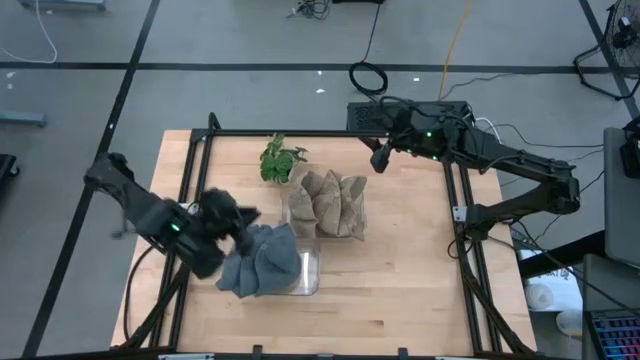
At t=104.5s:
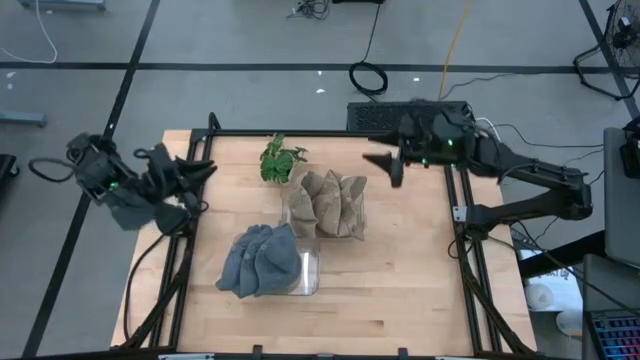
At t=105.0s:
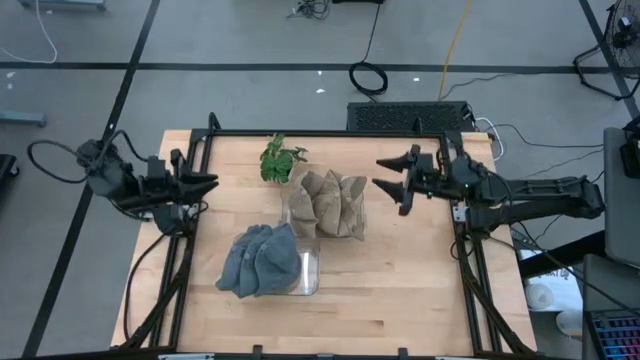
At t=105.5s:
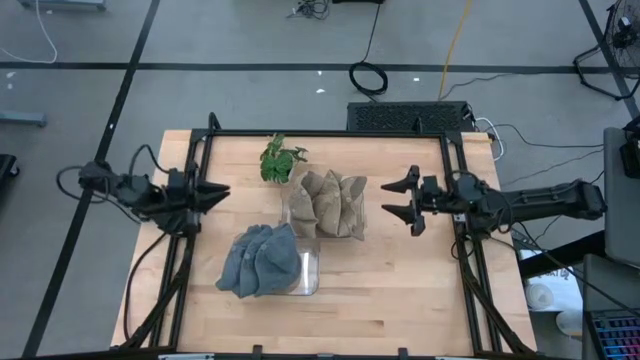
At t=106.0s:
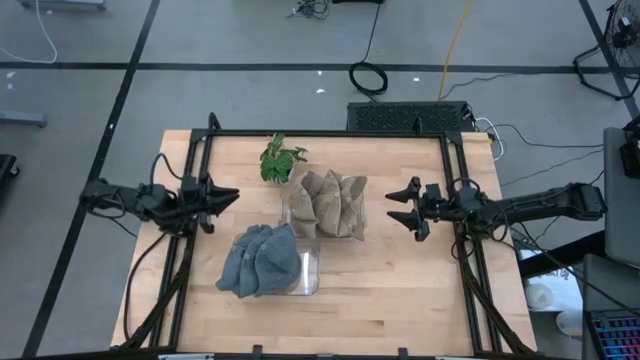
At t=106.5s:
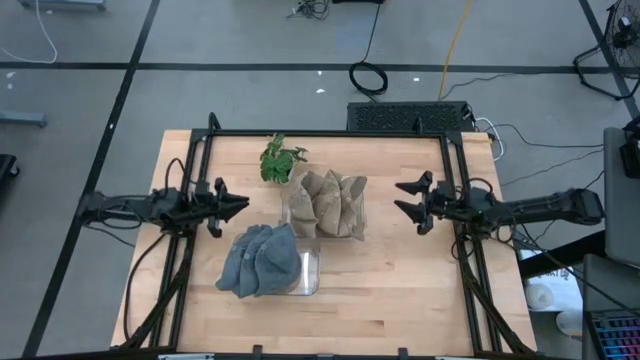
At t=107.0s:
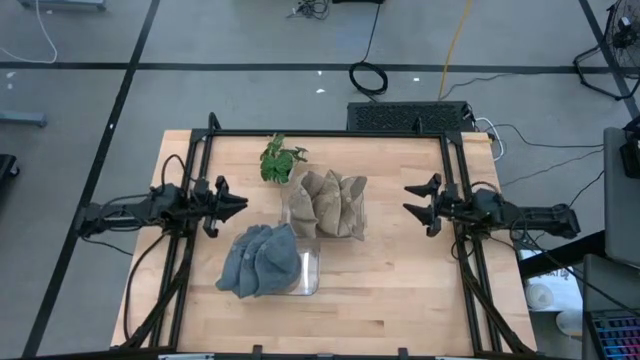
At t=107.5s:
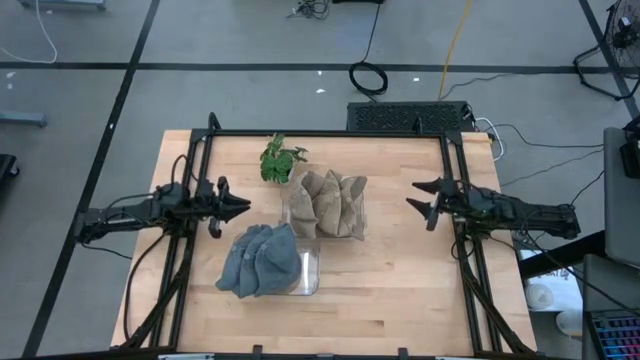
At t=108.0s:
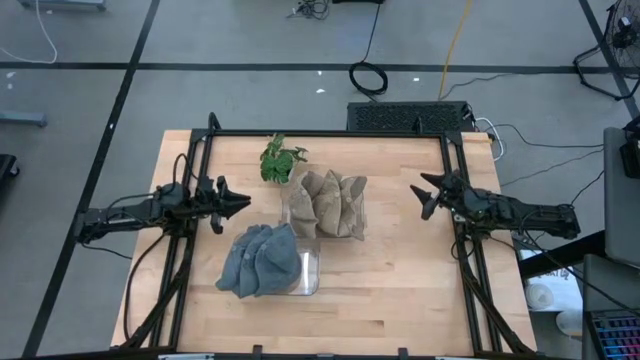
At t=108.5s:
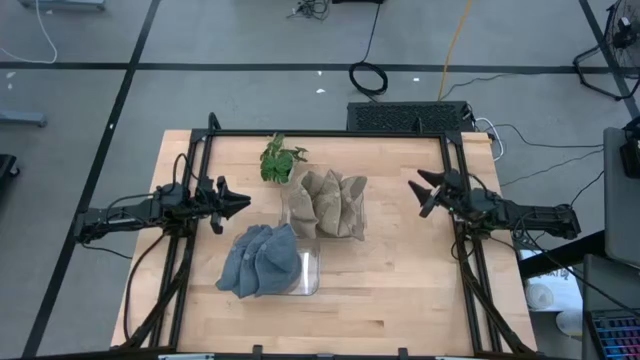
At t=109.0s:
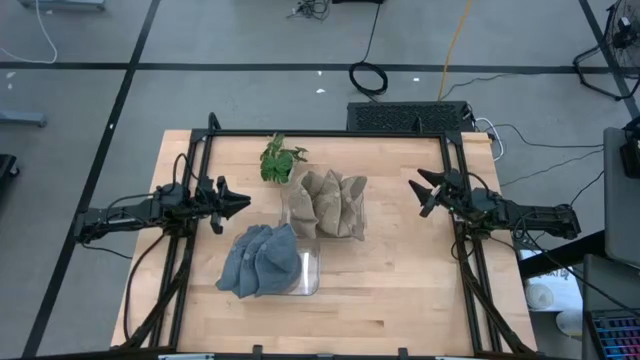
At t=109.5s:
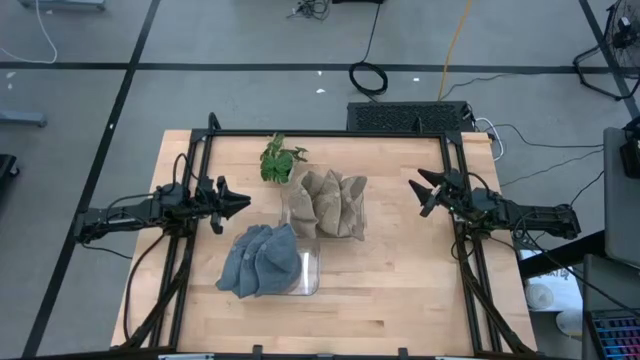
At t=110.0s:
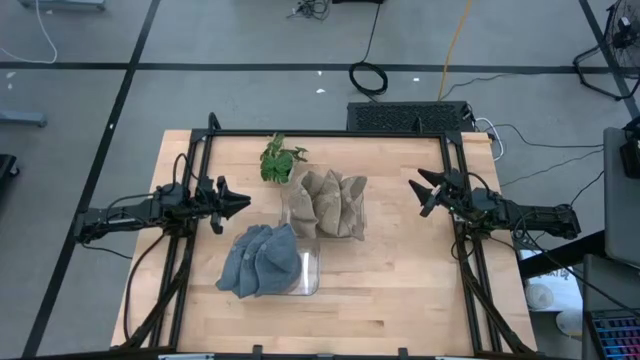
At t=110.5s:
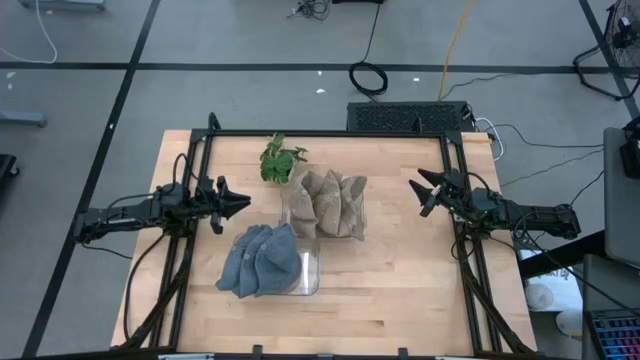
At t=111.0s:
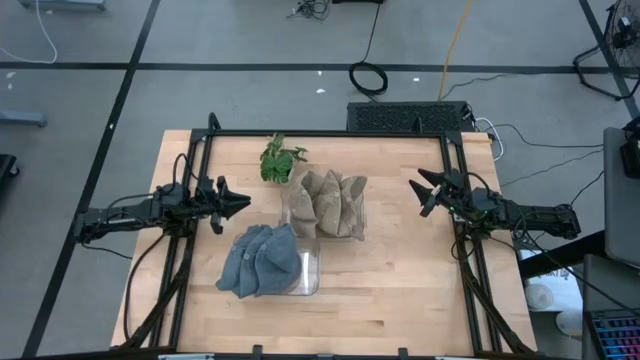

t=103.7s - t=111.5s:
Task: Pick & Place hat
Return to Home Position

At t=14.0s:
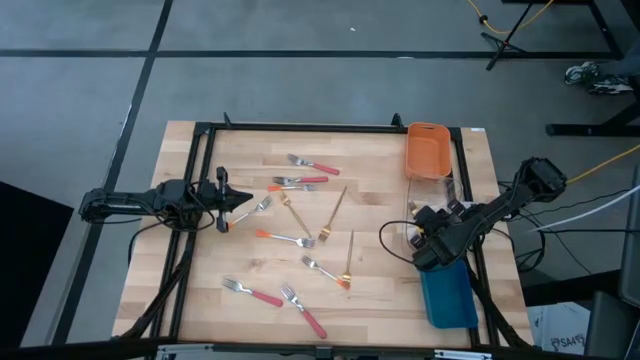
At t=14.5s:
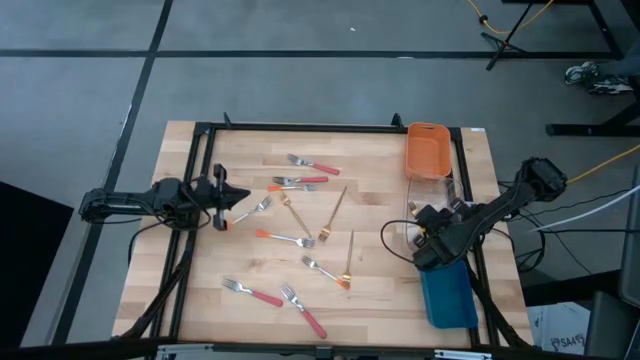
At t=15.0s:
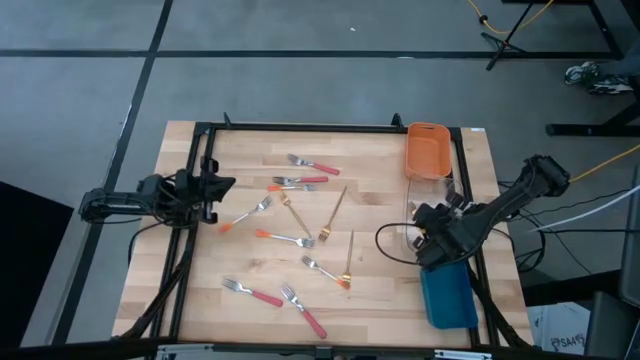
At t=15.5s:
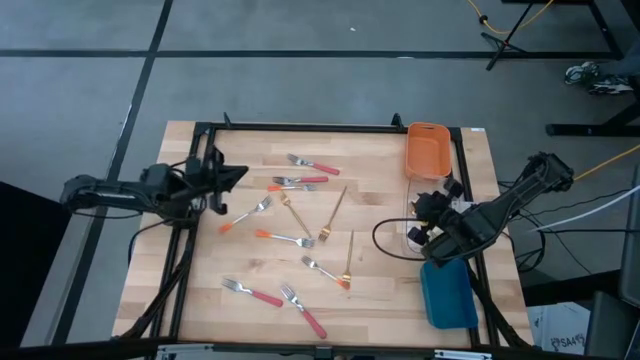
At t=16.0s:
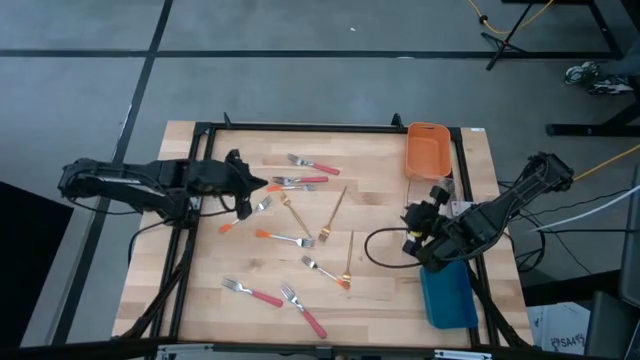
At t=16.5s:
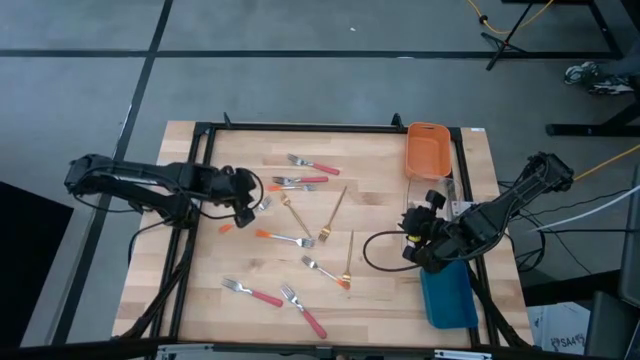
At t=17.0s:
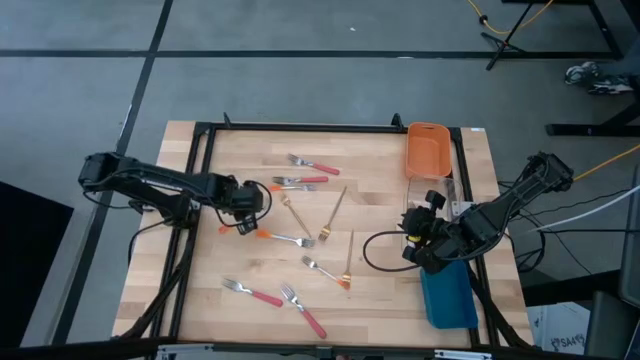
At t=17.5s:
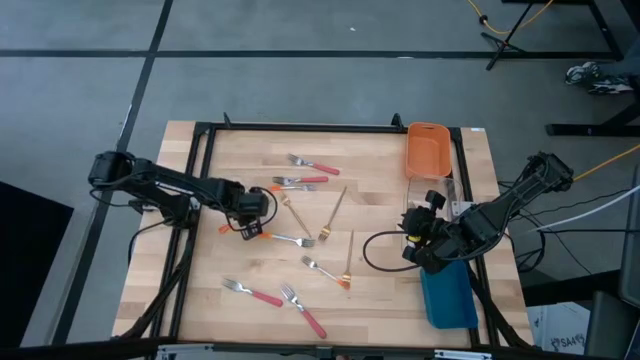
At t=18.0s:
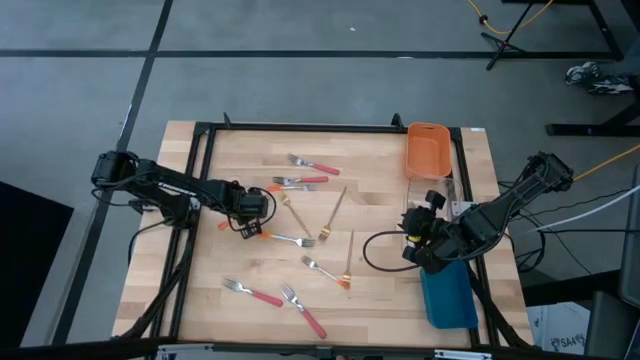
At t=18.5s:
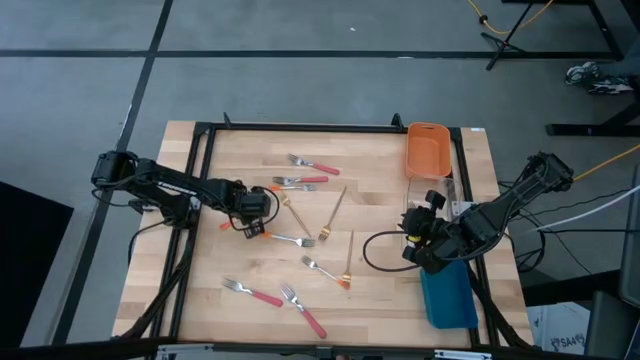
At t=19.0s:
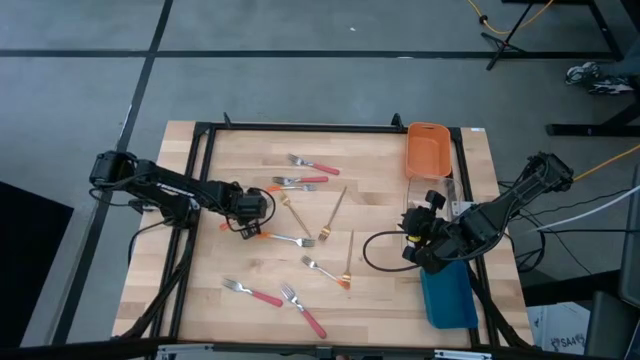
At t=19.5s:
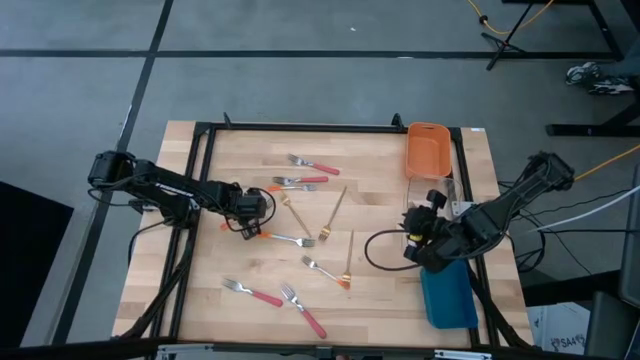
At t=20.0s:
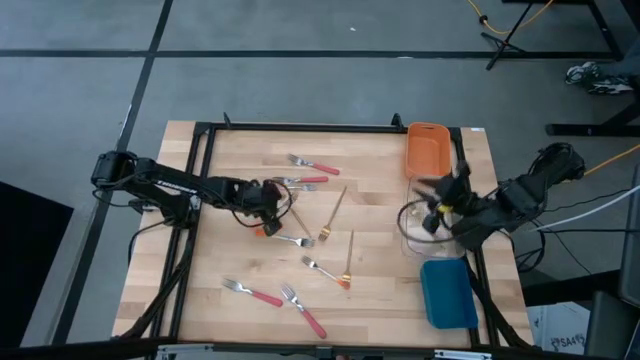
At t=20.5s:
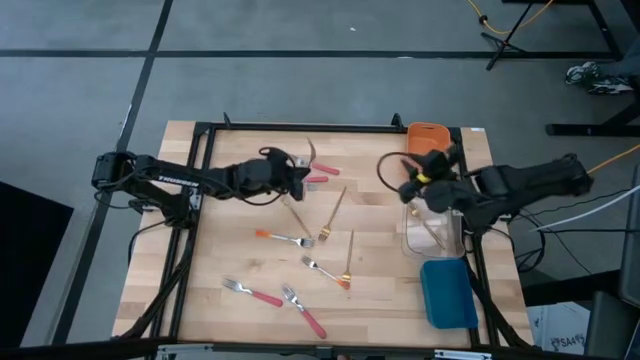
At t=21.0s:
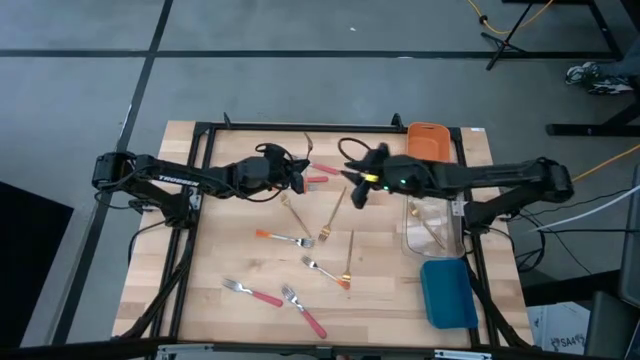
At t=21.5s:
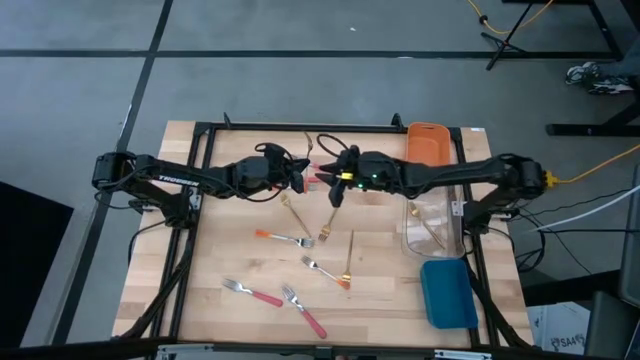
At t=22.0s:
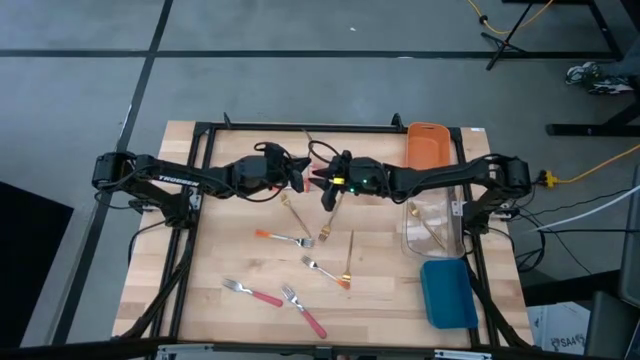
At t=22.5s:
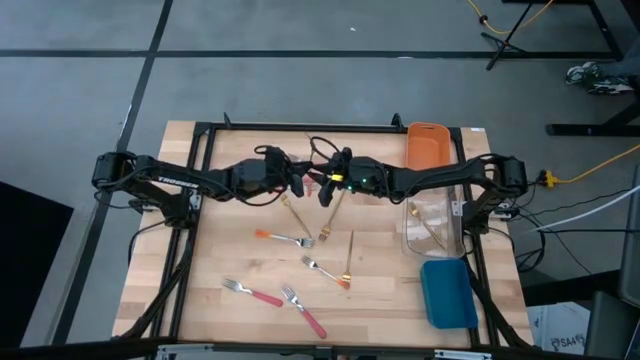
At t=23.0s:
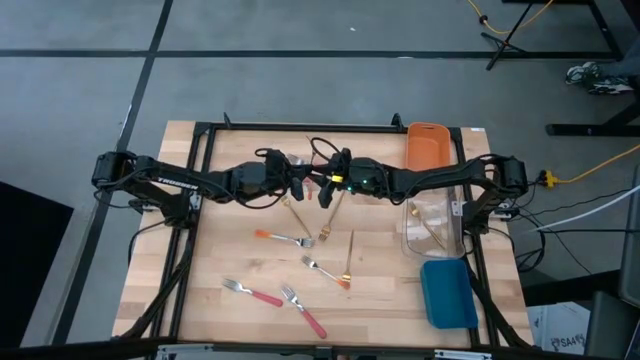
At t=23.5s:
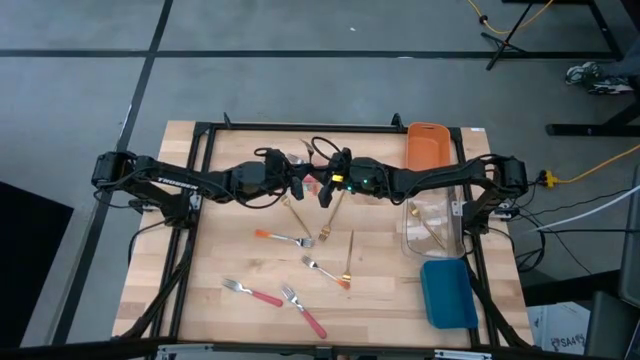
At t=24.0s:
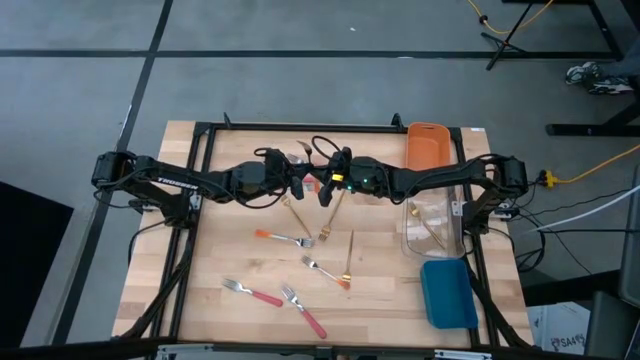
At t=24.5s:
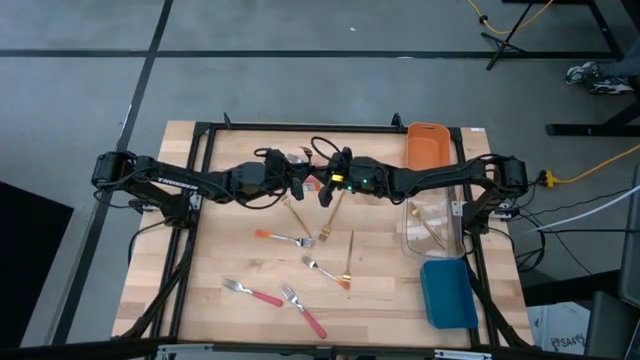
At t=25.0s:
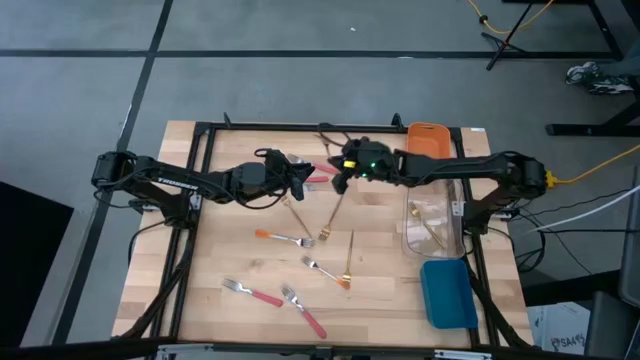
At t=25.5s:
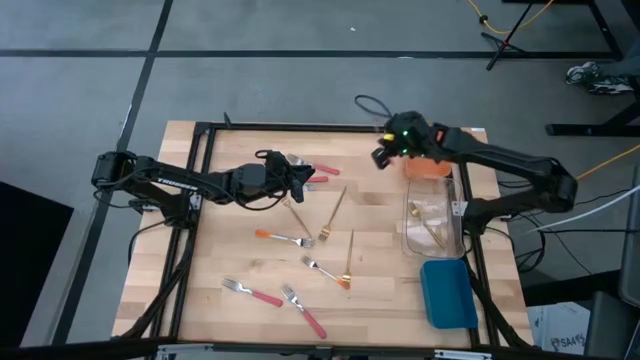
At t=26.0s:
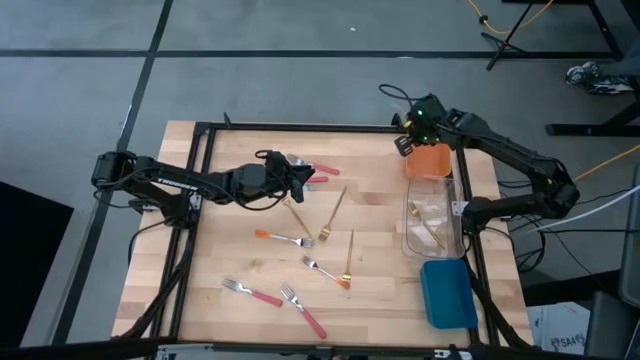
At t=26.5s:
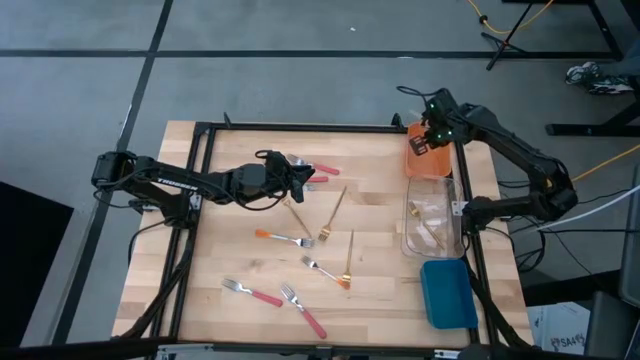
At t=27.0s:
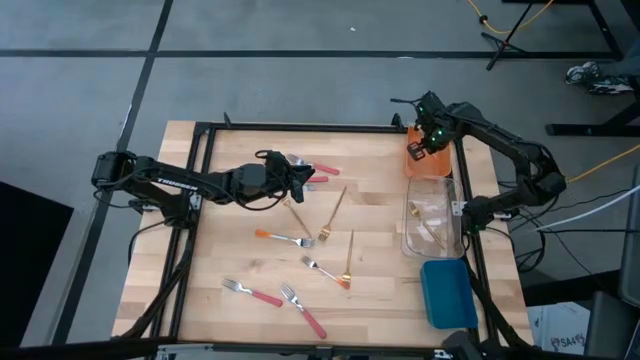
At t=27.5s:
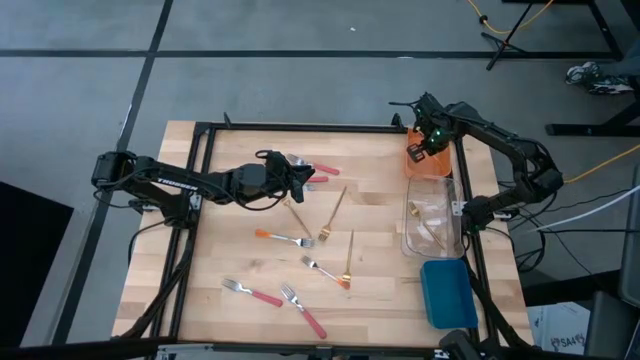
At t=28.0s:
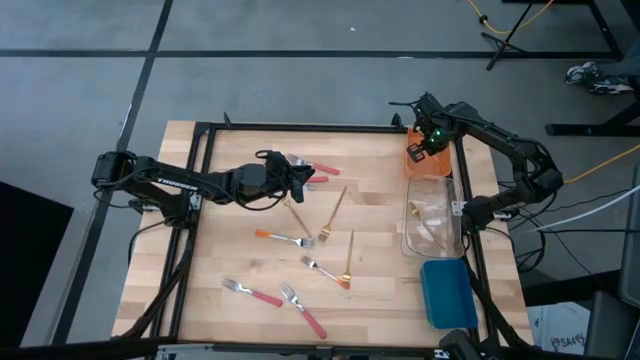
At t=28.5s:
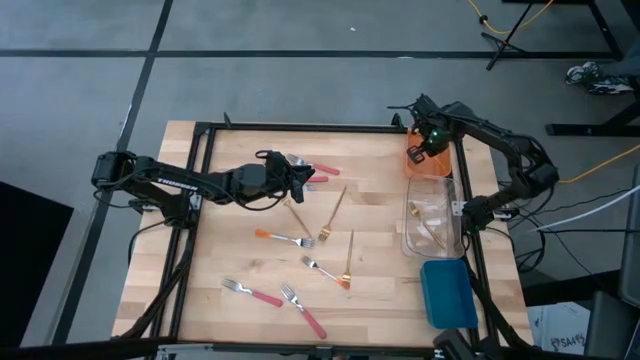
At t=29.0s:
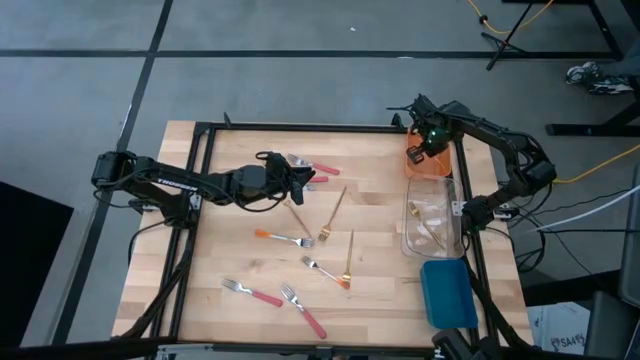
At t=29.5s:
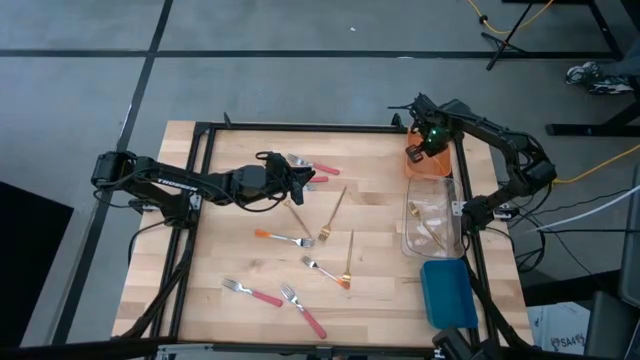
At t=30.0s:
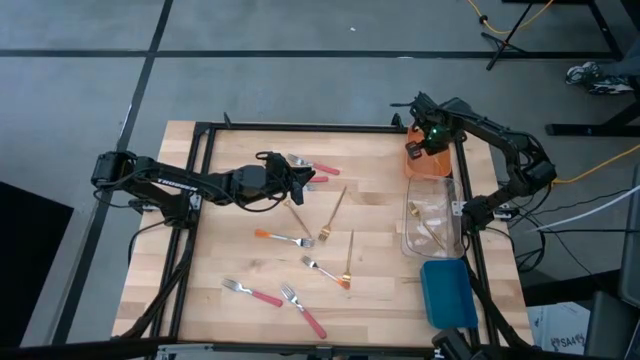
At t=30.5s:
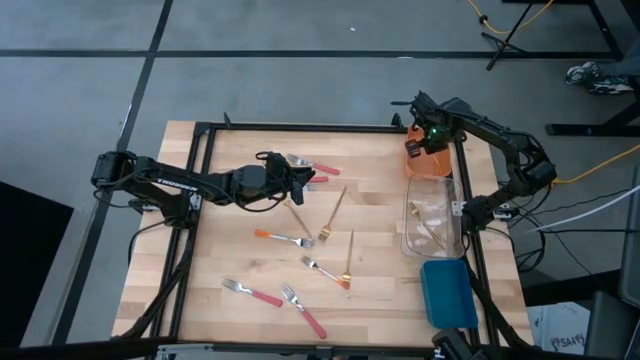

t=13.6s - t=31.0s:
Task: Sort silverware by color (type)
Put the orange fork into the orange bin
